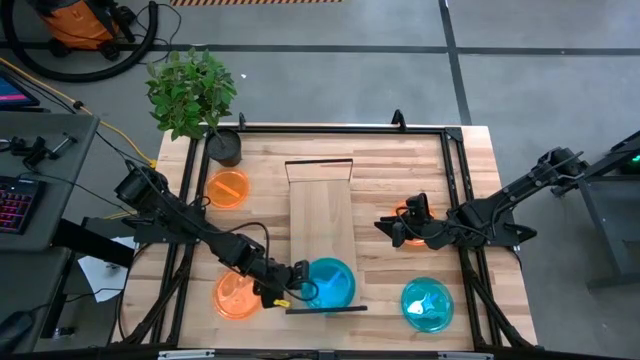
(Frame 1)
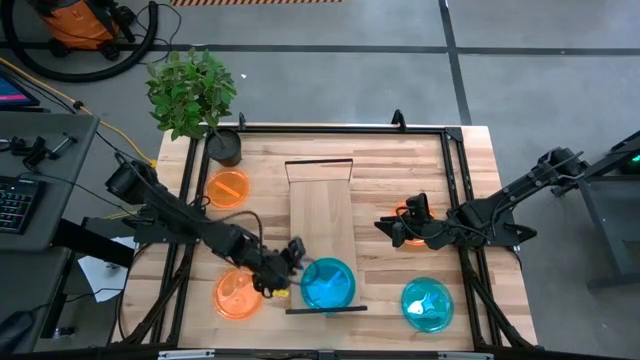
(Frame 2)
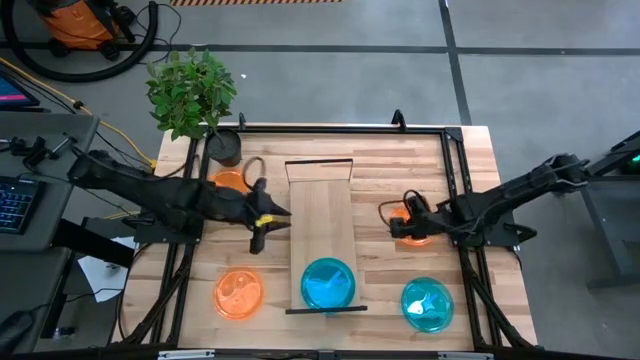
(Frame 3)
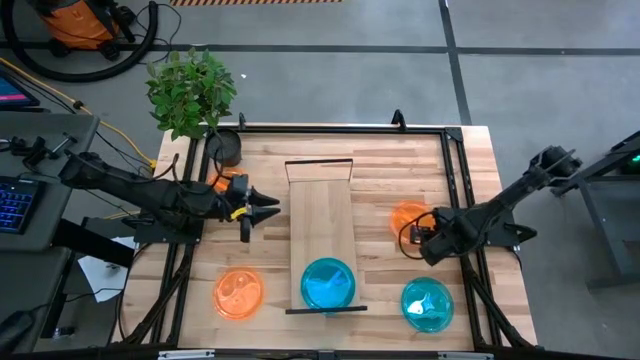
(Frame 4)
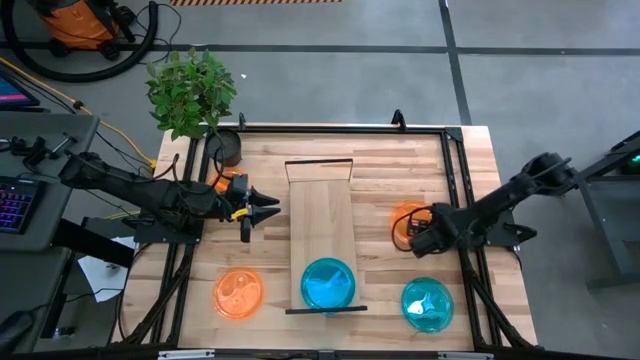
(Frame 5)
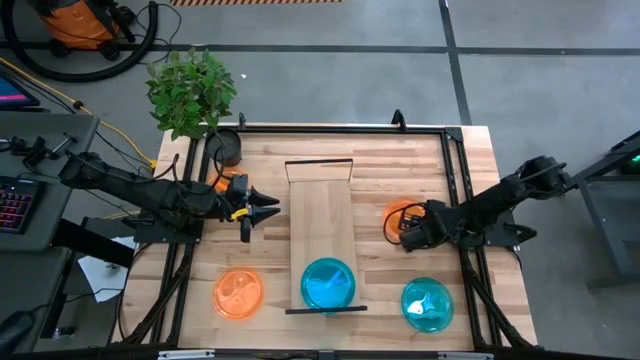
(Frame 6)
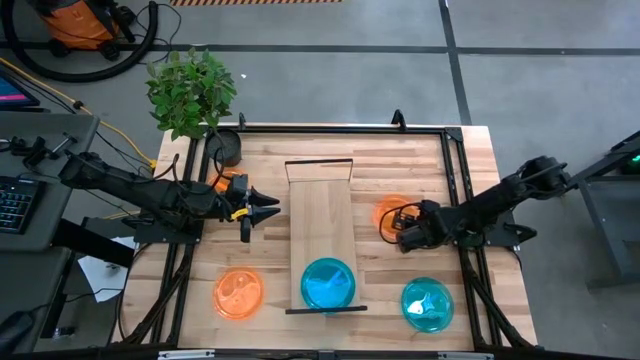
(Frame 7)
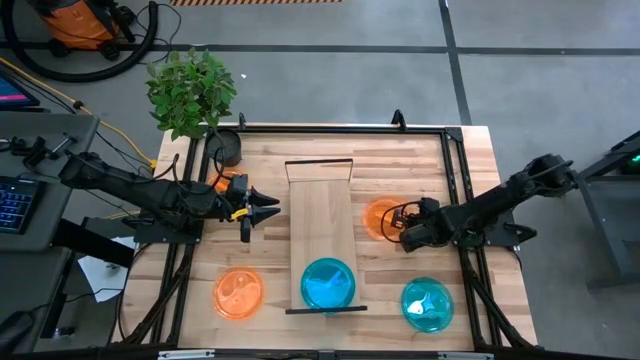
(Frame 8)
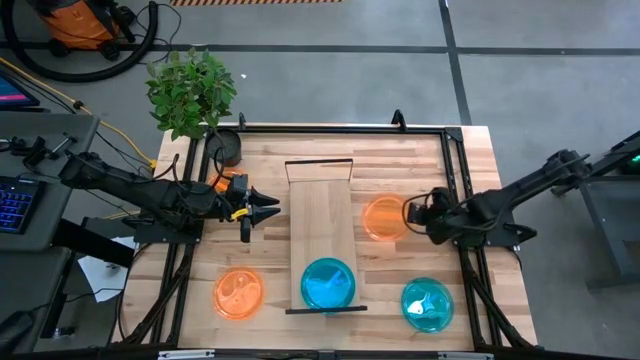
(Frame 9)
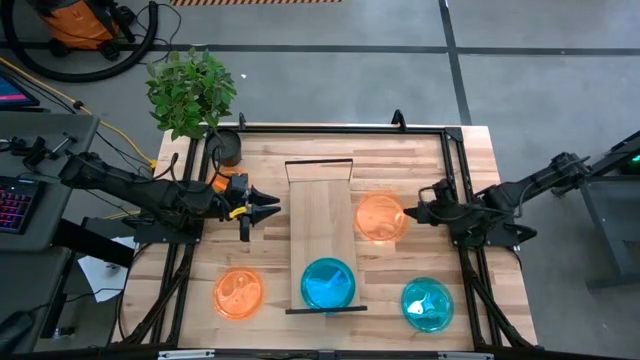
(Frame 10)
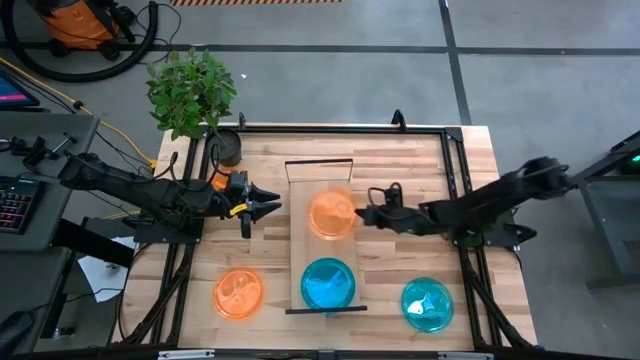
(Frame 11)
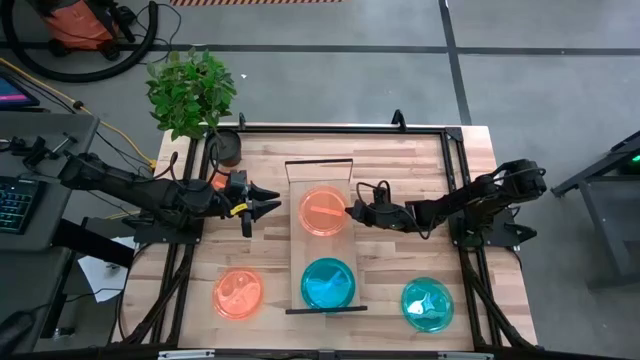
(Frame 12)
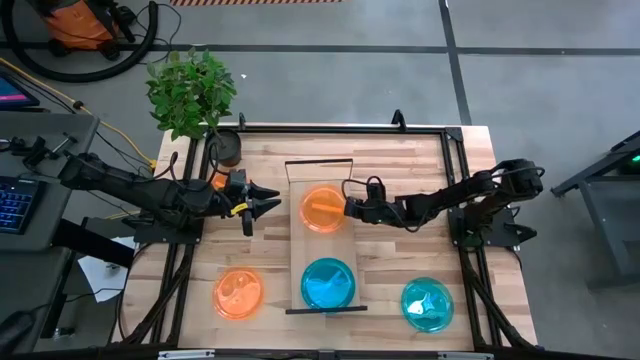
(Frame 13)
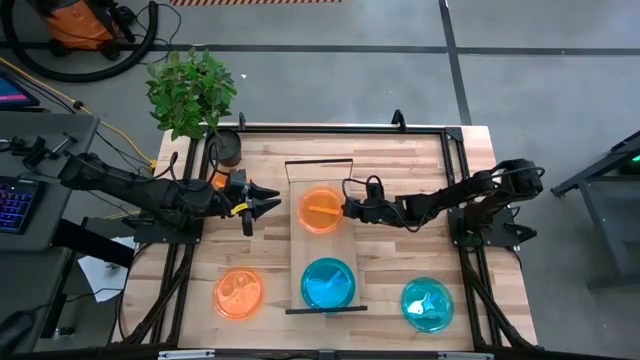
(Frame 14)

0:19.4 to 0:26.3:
Task: Place and stack plates onto a shelf
Put middle right orange transparent plate on the shelf

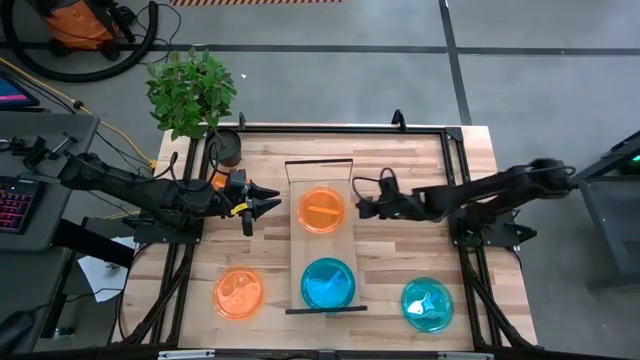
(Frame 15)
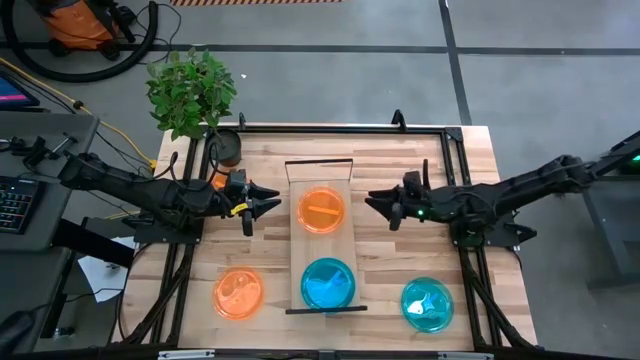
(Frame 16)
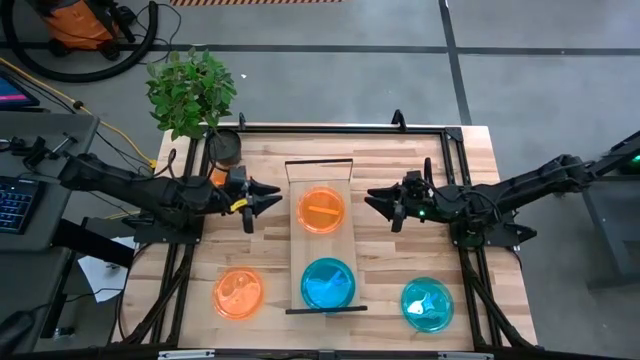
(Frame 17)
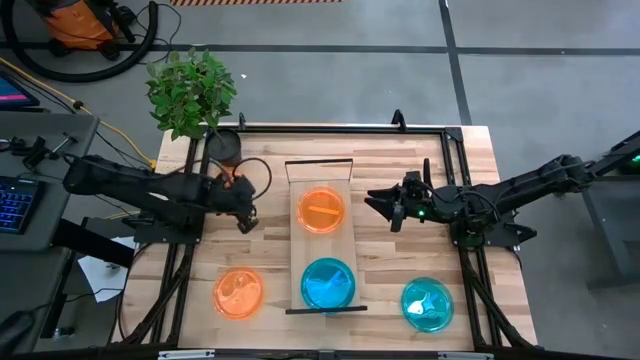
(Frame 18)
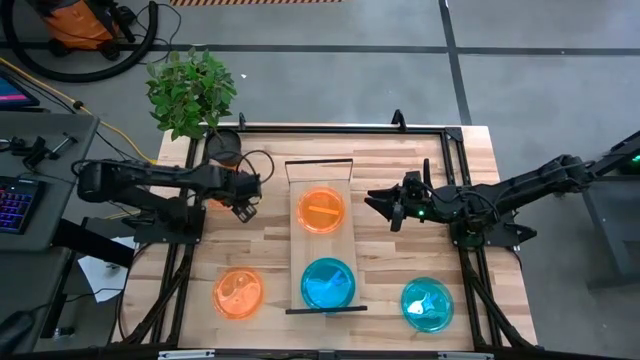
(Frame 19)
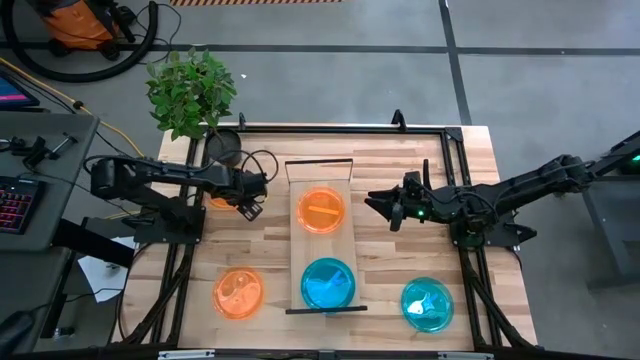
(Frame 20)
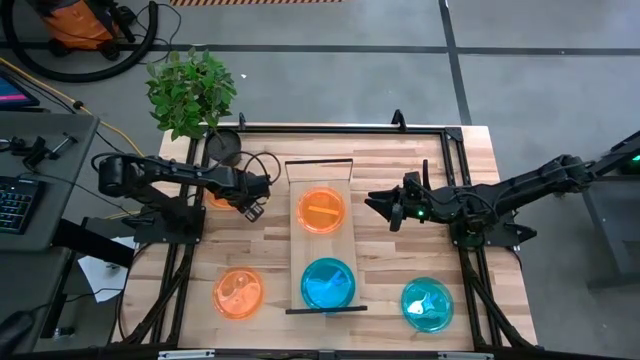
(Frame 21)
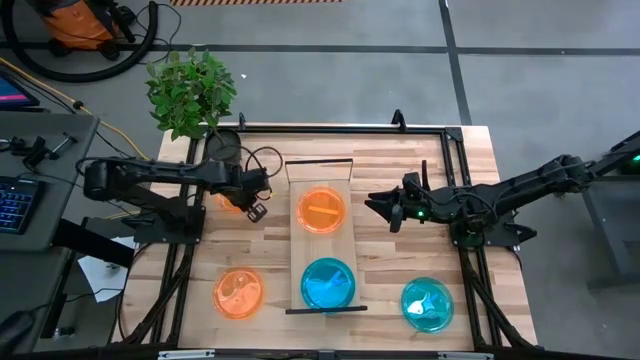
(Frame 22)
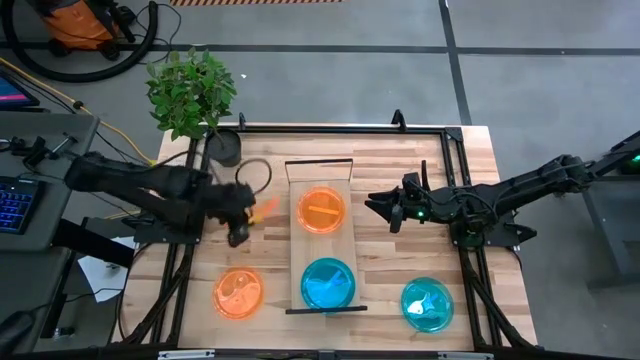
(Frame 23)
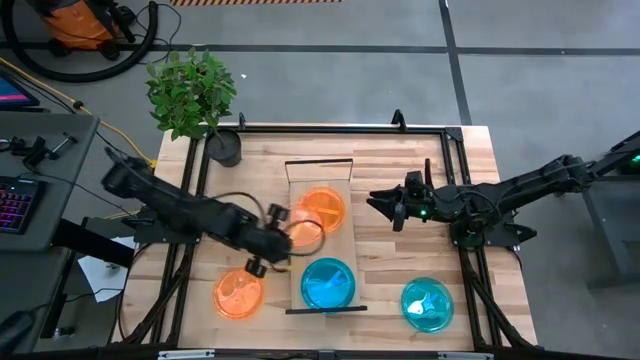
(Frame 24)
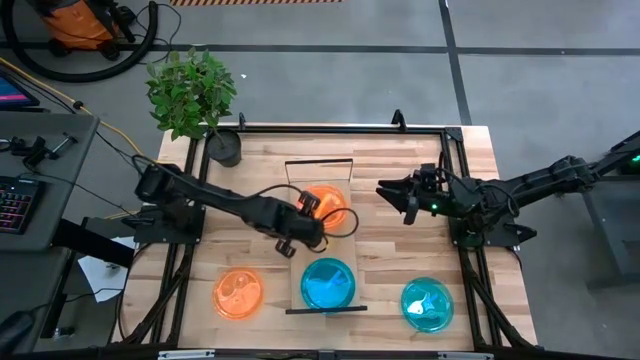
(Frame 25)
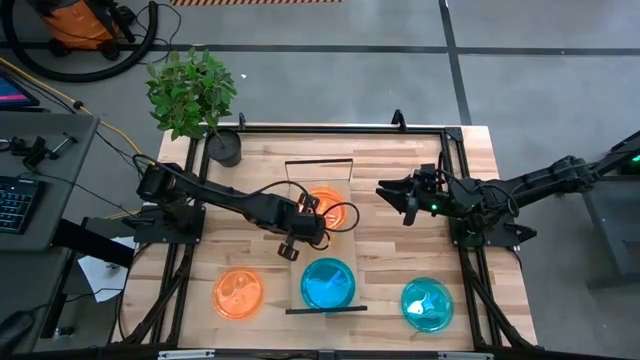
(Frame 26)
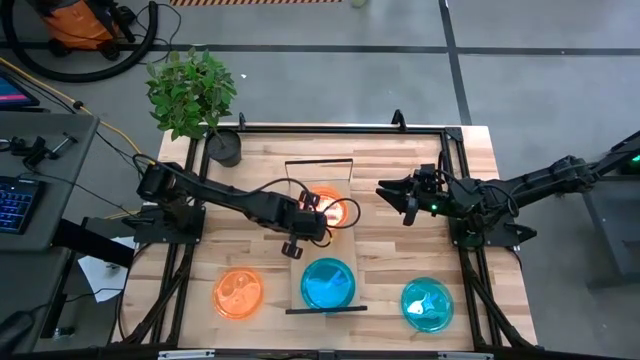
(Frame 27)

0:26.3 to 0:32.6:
Stack the top orange transparent plate on the orange transparent plate

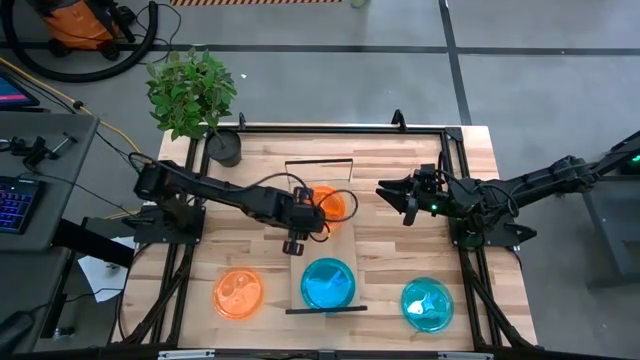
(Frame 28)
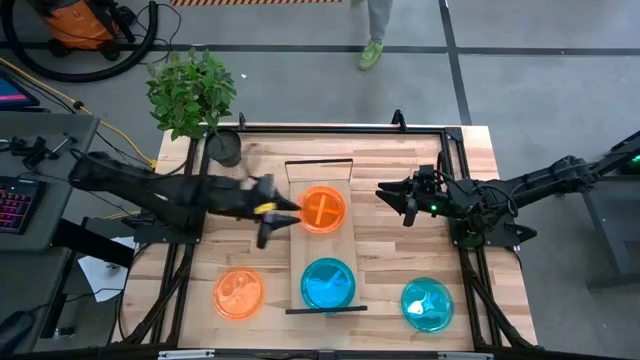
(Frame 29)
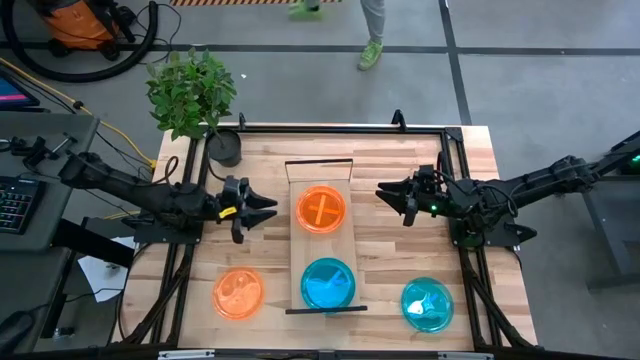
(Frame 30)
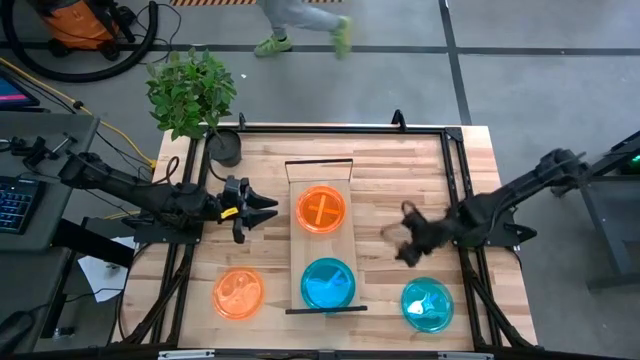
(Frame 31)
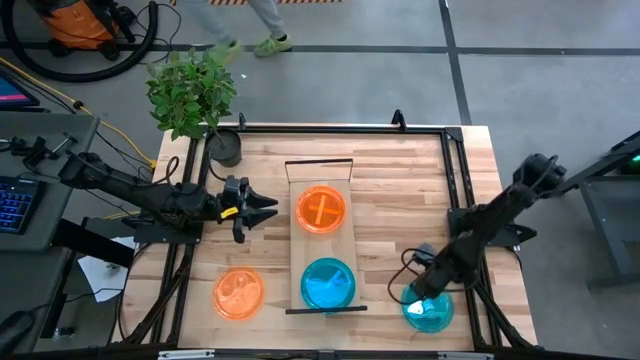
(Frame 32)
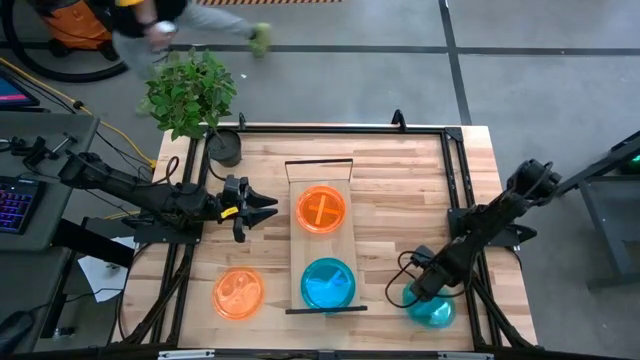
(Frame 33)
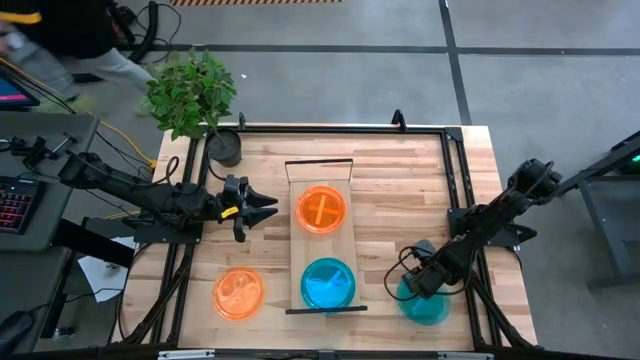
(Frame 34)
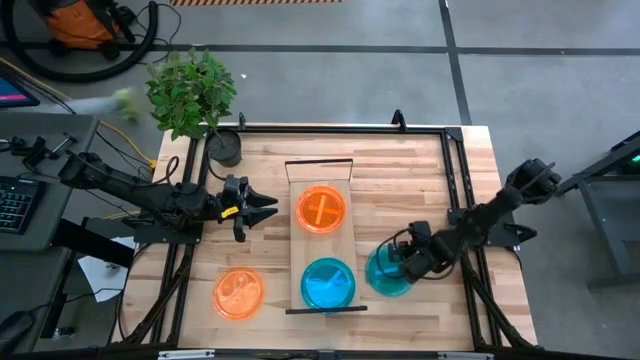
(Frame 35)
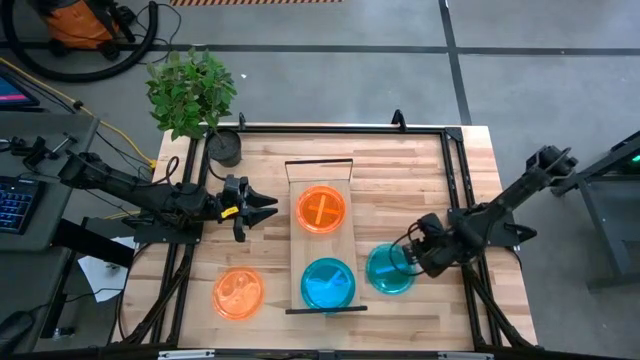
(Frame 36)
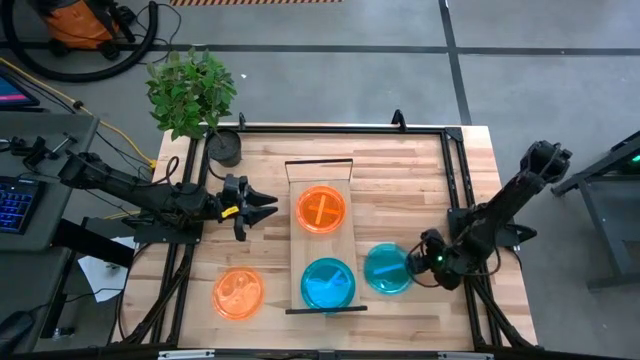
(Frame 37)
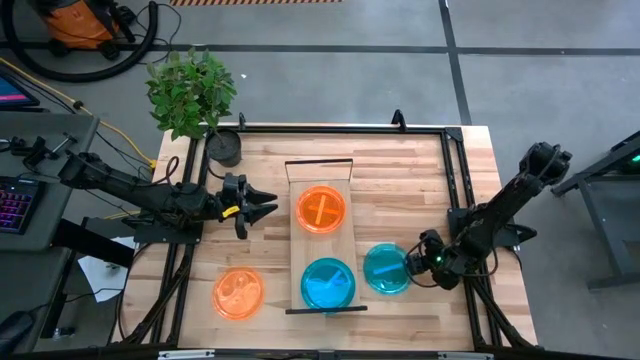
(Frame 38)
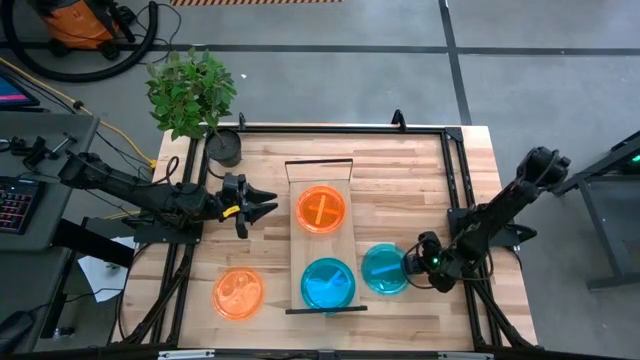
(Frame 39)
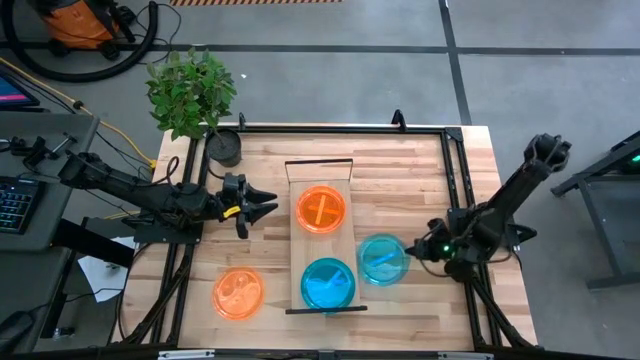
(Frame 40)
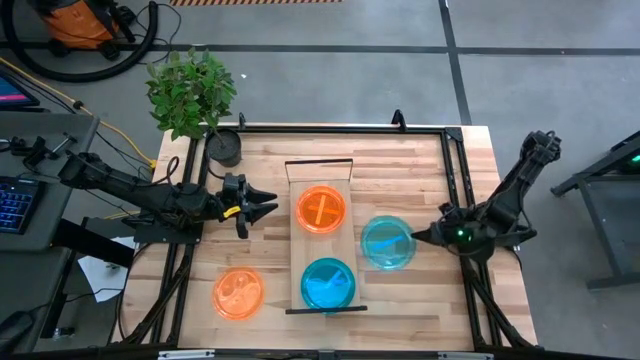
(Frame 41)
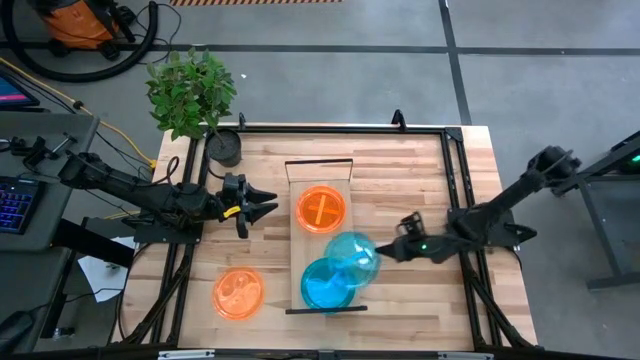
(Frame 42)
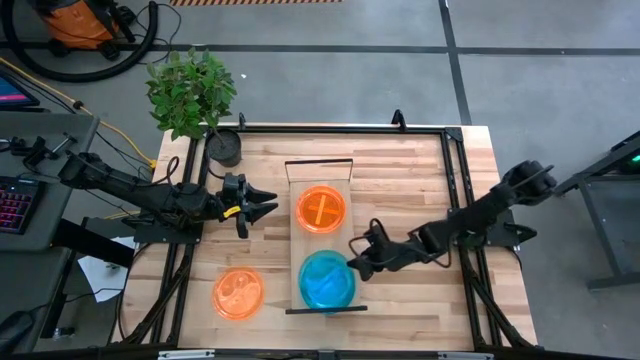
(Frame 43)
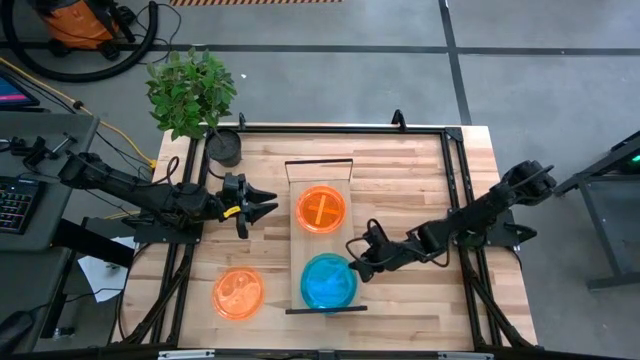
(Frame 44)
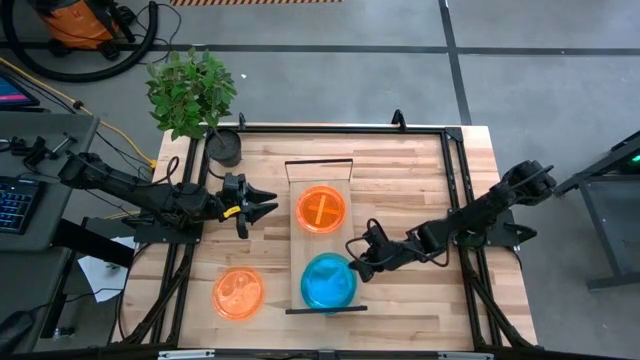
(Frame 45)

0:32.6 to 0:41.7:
Stack the blue transparent plate on the blue transparent plate

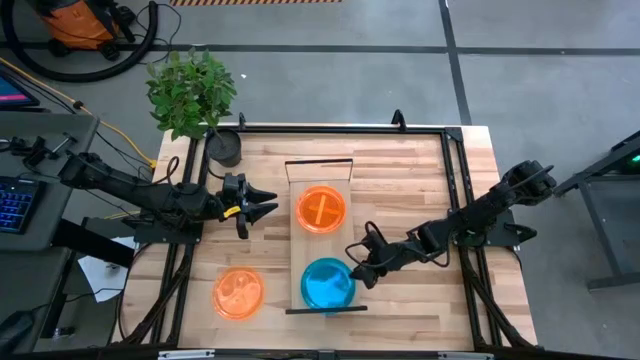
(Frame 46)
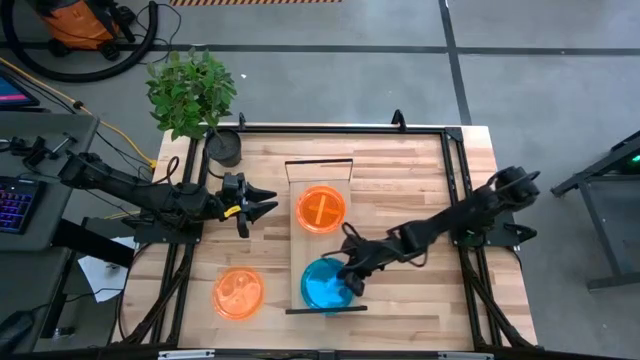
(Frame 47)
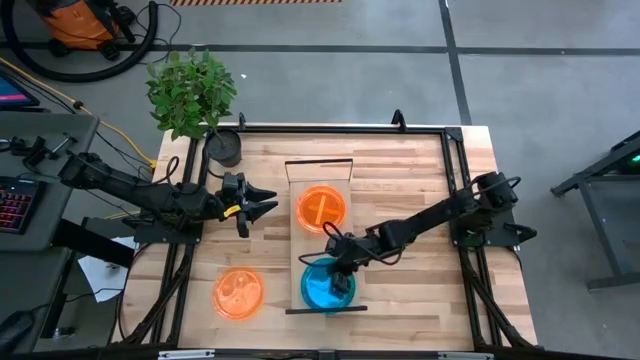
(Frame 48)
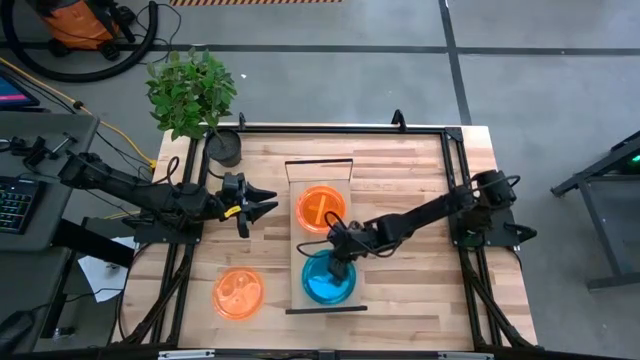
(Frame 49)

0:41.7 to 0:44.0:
Adjust the stacked blue plates
